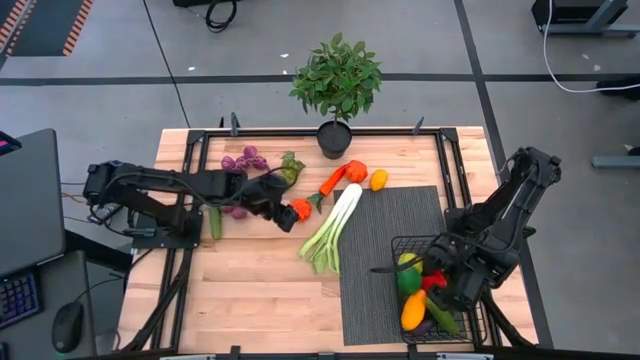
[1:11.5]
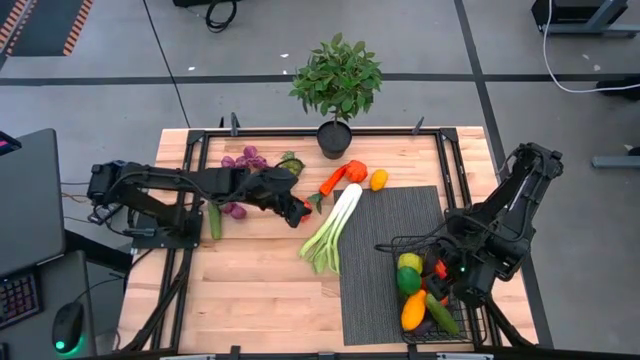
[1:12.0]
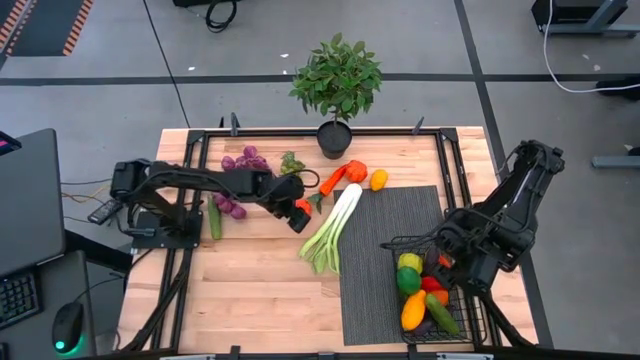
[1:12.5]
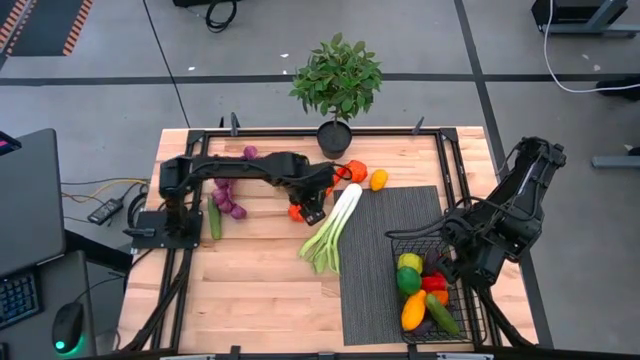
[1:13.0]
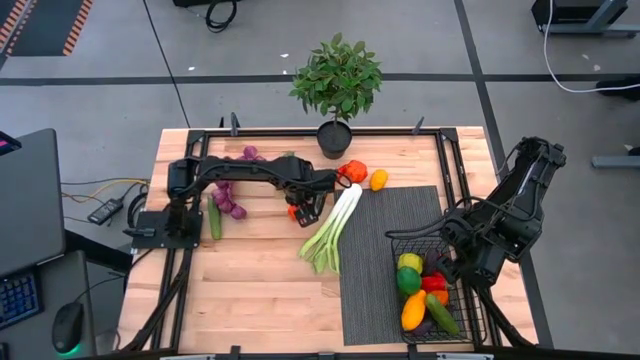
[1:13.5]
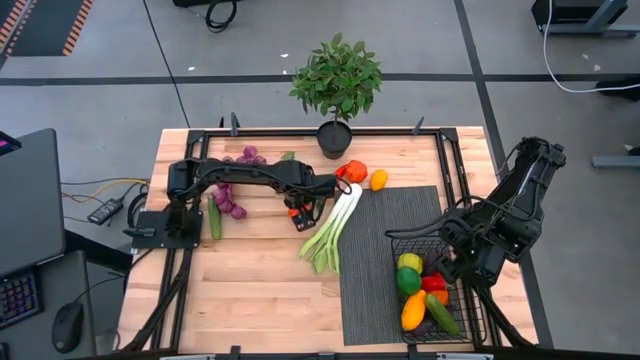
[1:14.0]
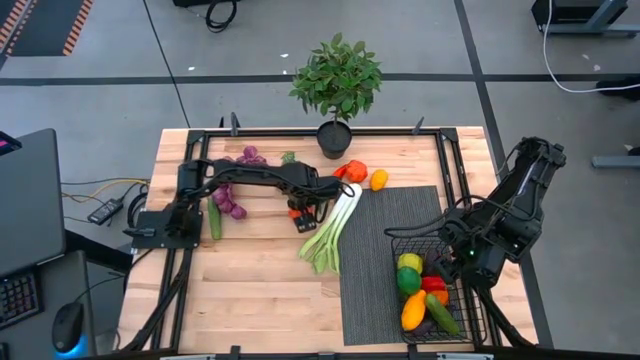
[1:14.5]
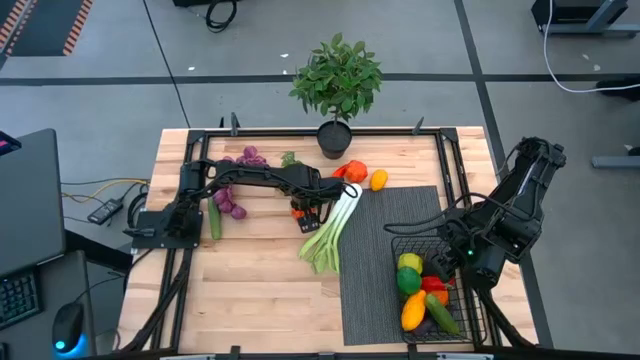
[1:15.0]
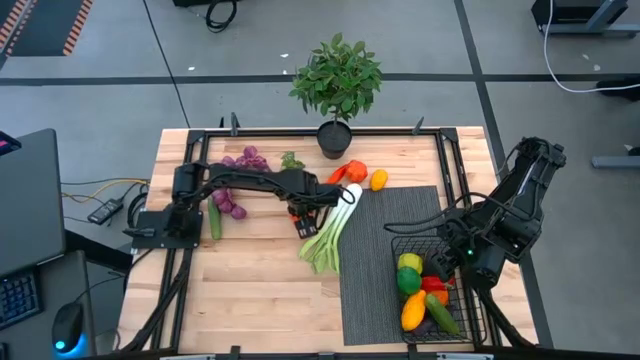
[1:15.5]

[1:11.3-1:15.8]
Task: Build produce basket
Put the bottom squash into the black wire basket

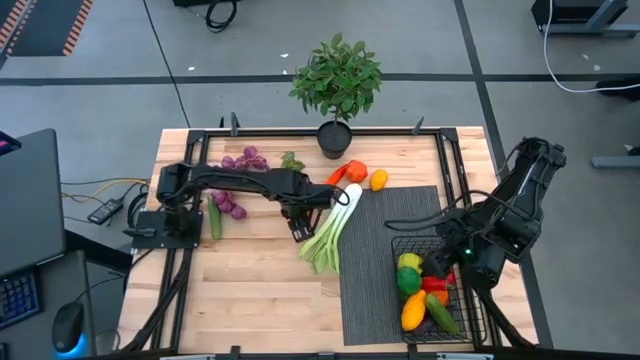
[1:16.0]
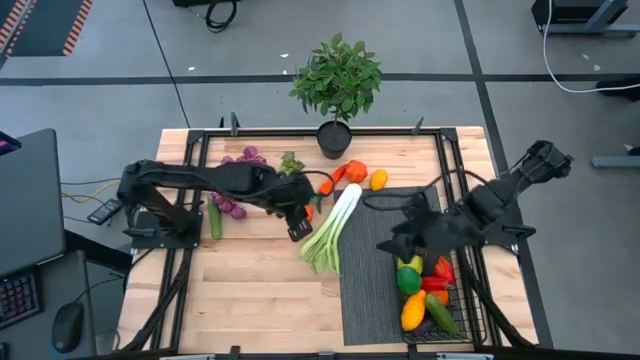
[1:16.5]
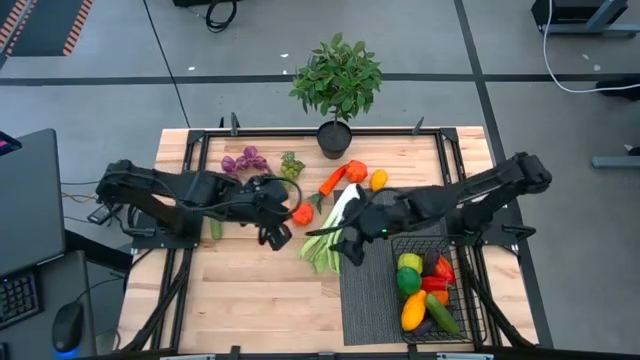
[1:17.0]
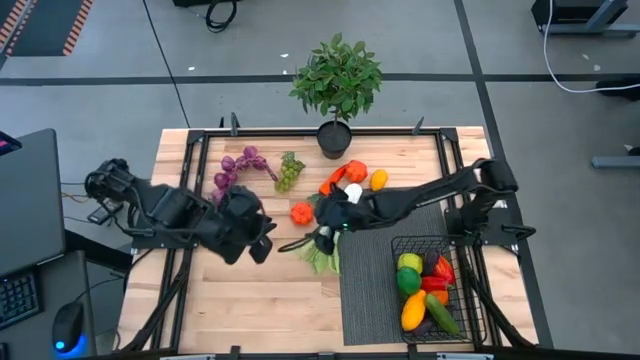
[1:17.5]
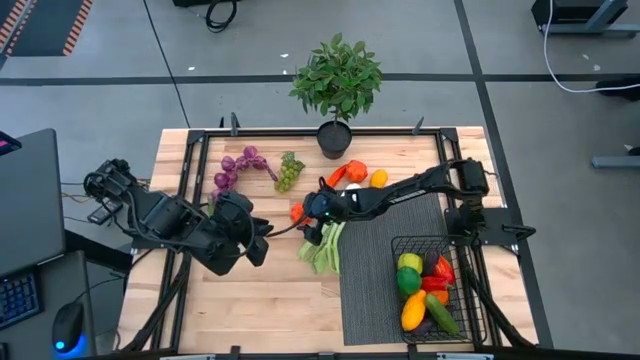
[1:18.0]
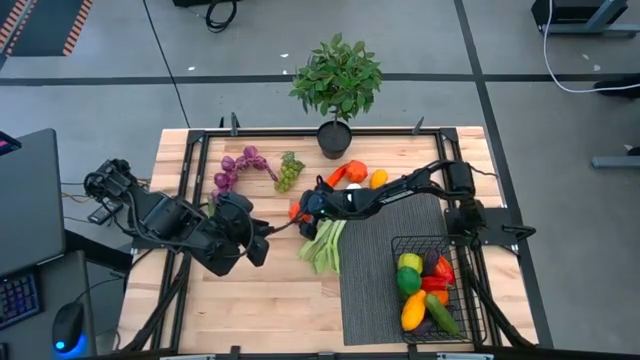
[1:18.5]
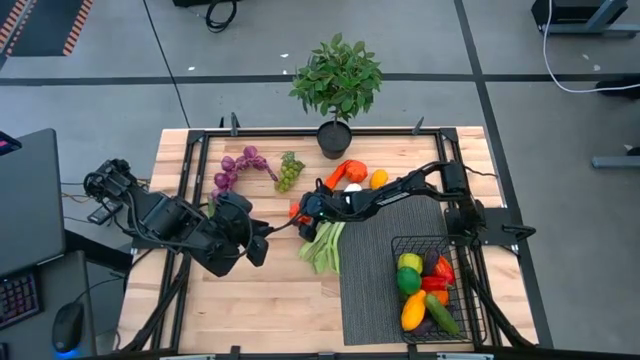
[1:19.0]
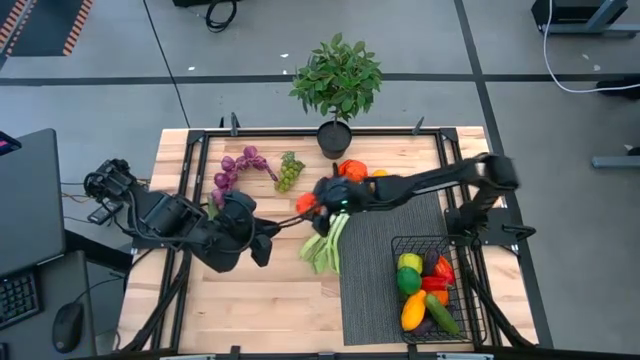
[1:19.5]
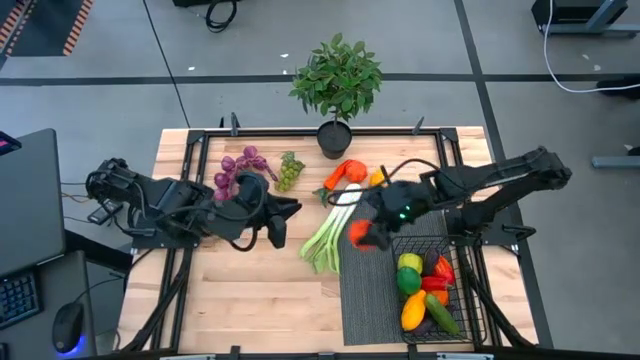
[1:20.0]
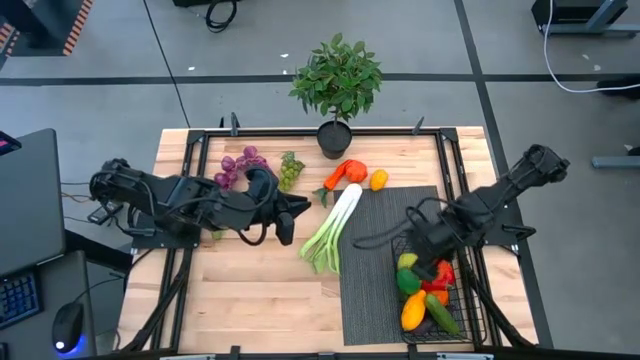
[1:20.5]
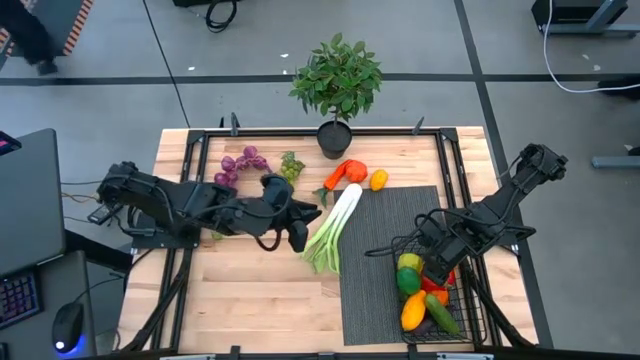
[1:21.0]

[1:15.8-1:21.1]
Put the bottom squash into the black wire basket

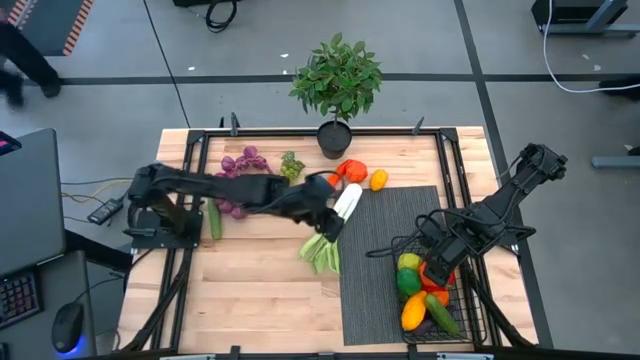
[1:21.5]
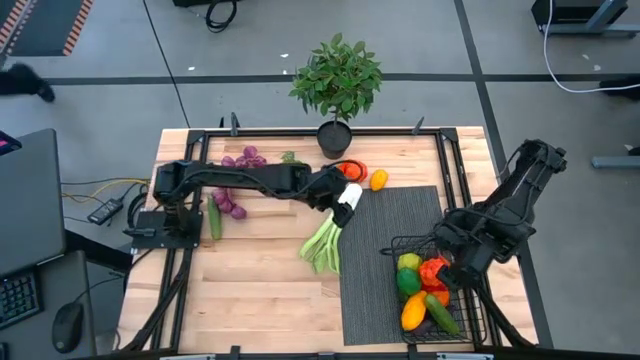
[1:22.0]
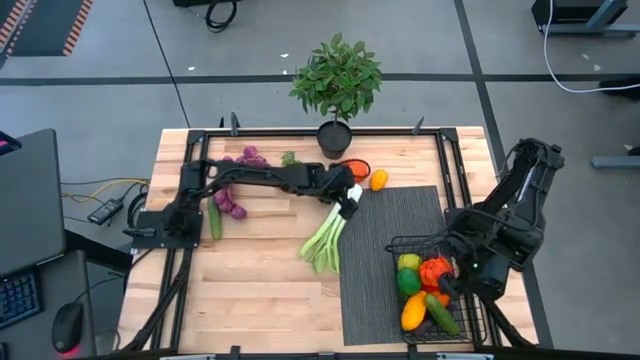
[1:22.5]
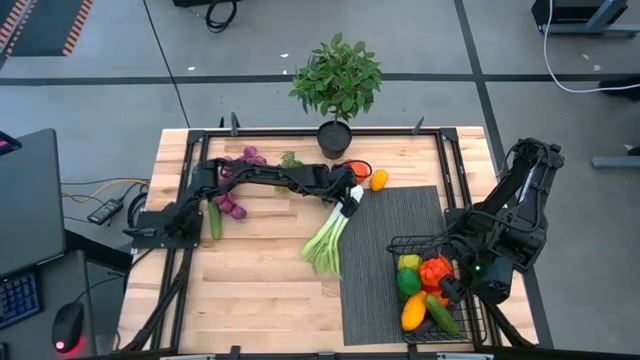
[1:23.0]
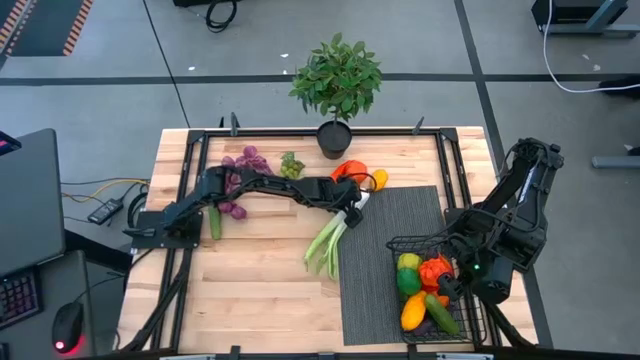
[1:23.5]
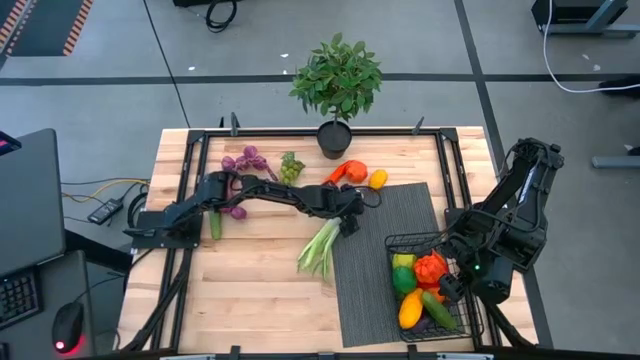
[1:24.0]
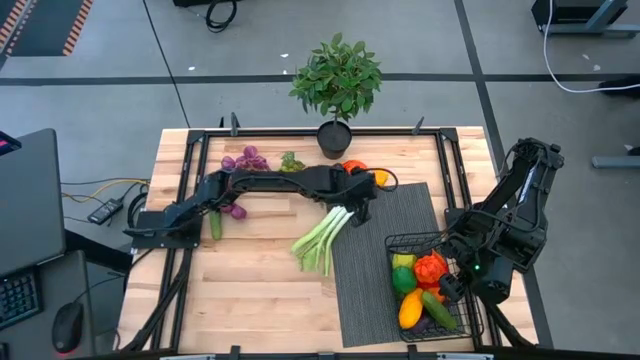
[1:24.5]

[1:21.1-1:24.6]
Put the lettuce into the black wire basket

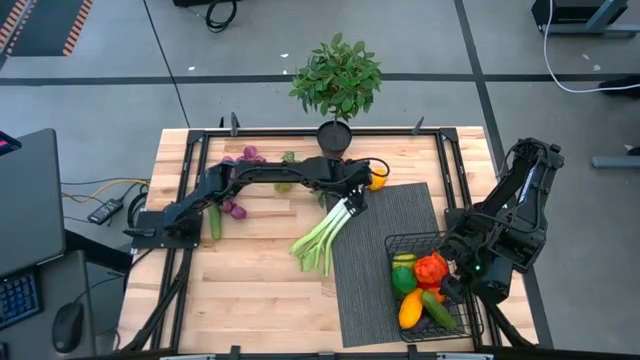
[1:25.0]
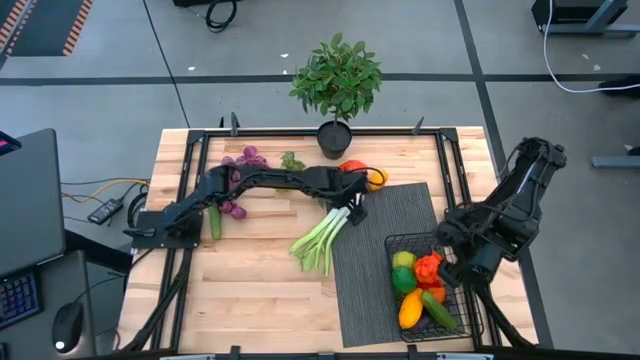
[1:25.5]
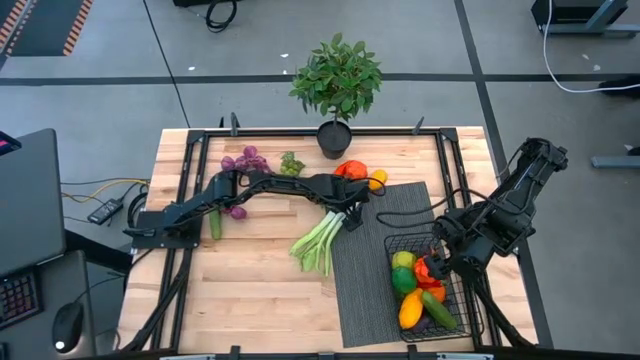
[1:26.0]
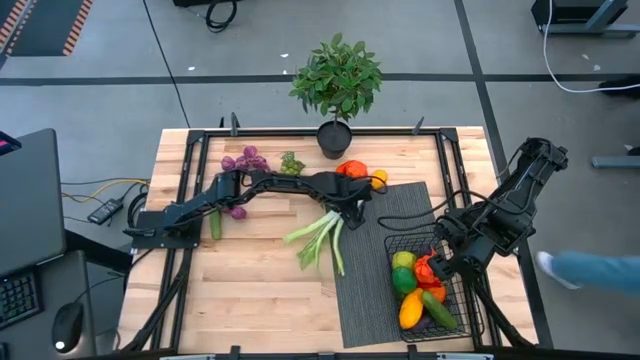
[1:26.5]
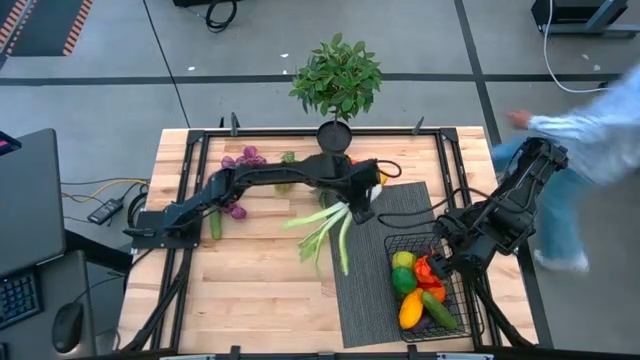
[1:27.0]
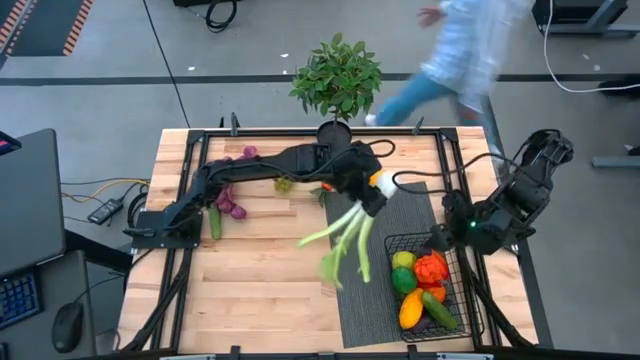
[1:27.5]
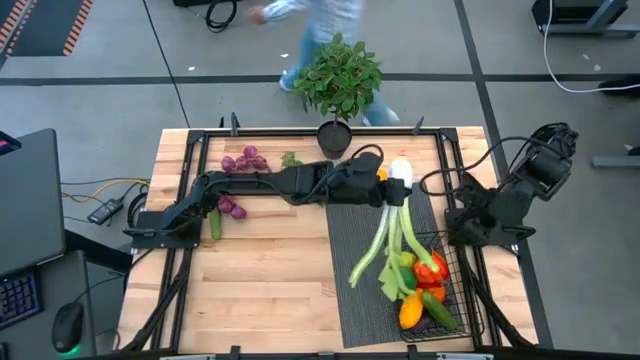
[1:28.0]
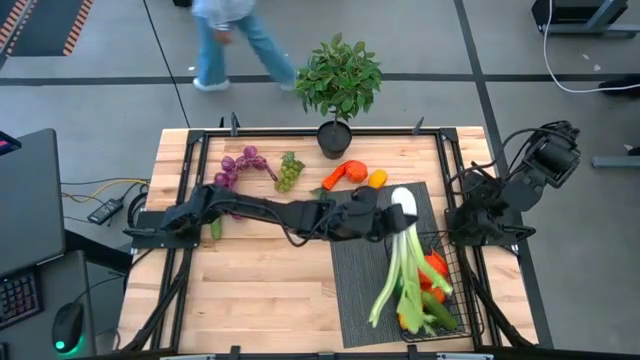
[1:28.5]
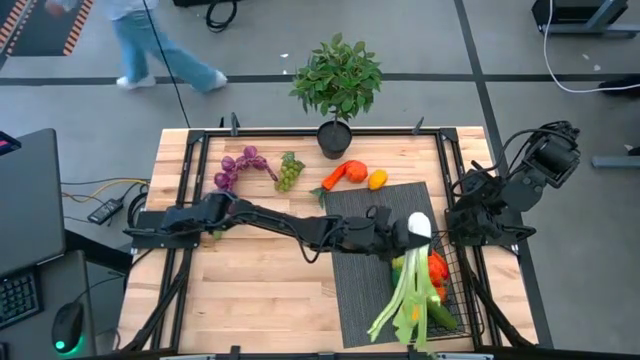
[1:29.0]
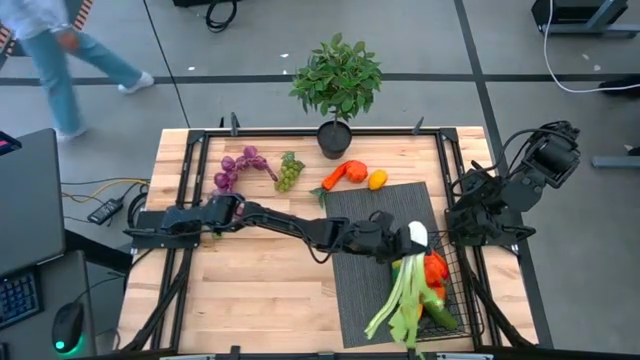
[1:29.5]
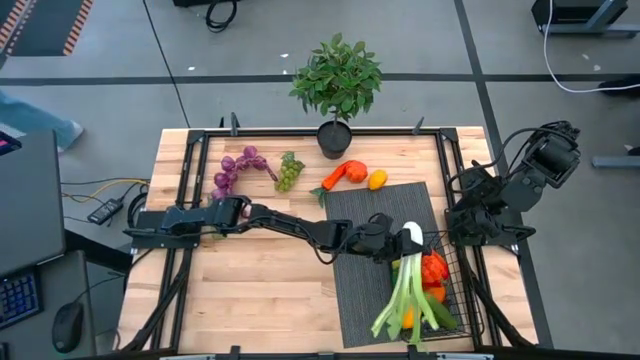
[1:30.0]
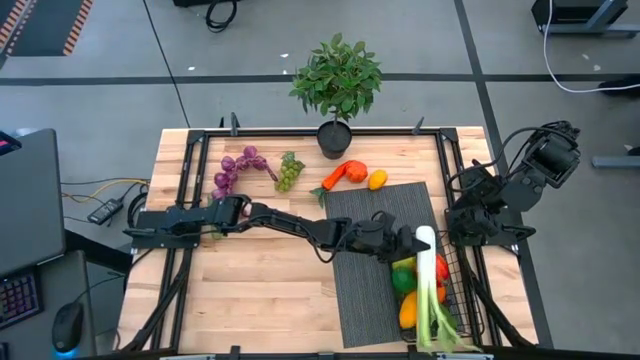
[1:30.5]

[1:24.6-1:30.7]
Put the lettuce into the black wire basket
